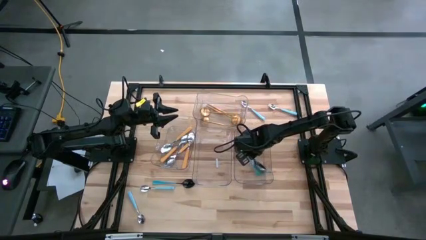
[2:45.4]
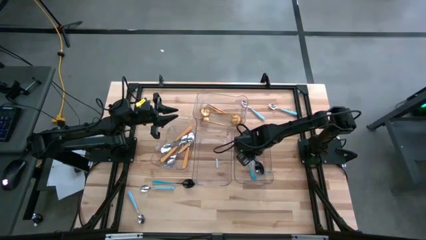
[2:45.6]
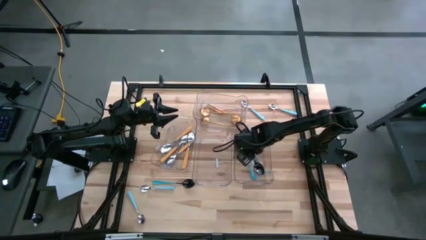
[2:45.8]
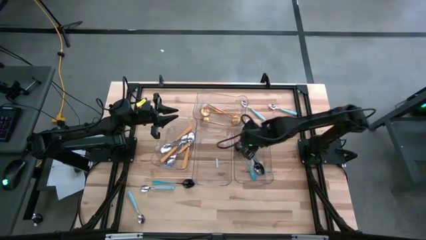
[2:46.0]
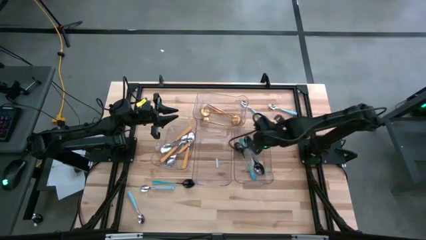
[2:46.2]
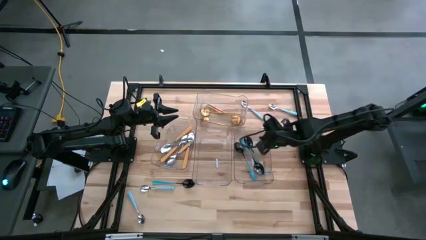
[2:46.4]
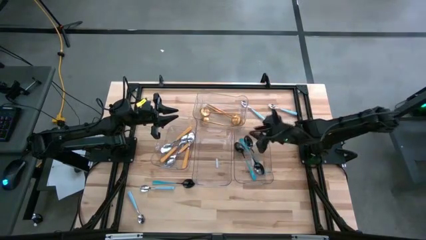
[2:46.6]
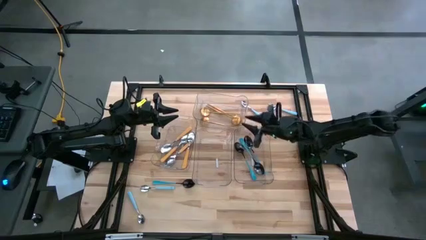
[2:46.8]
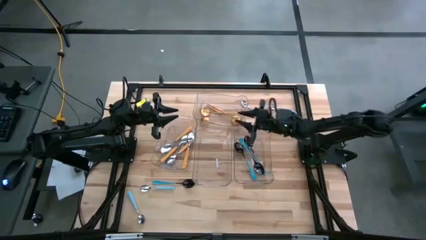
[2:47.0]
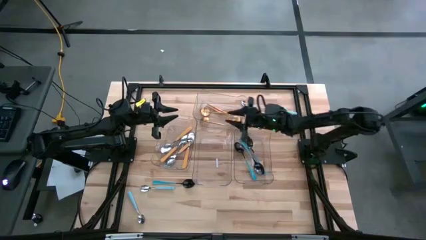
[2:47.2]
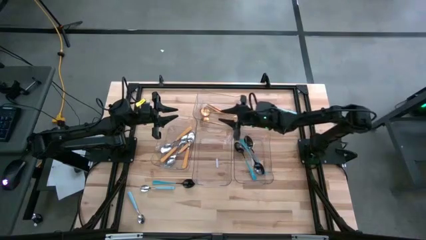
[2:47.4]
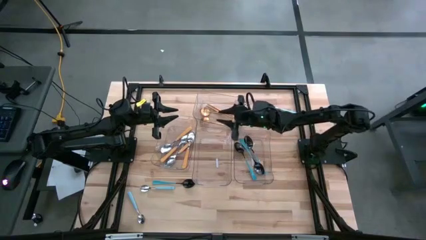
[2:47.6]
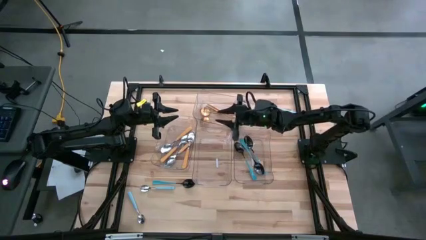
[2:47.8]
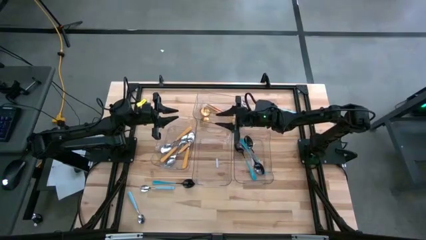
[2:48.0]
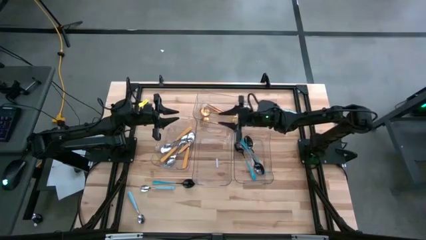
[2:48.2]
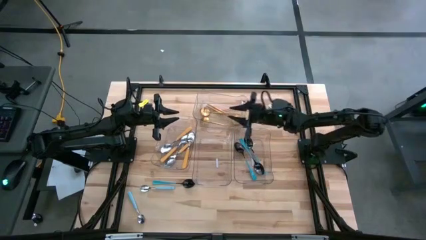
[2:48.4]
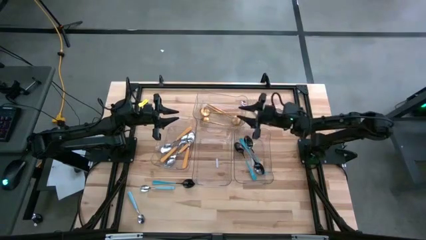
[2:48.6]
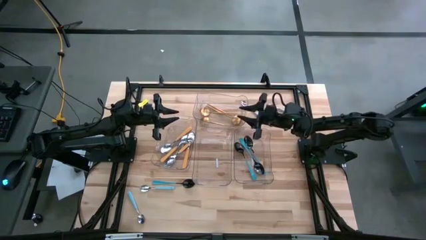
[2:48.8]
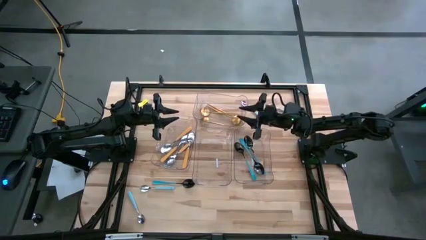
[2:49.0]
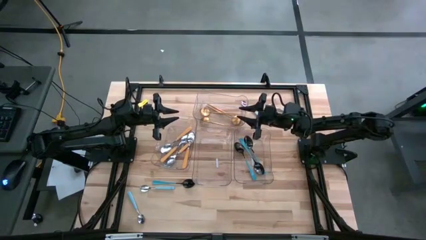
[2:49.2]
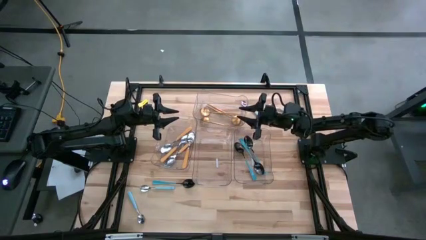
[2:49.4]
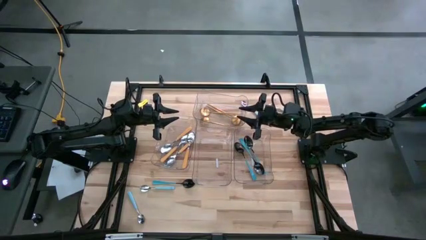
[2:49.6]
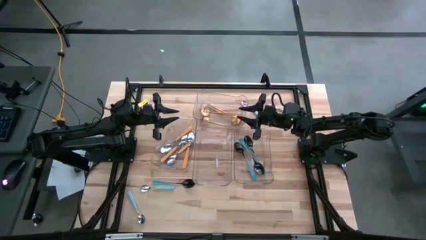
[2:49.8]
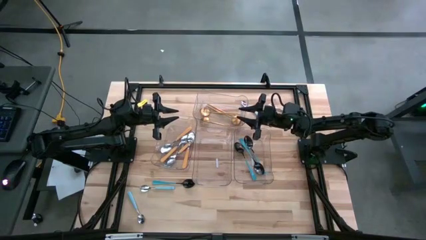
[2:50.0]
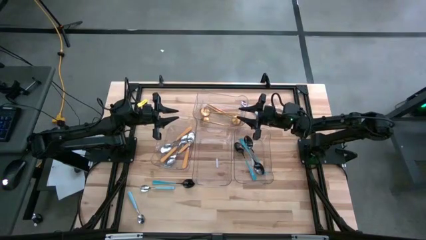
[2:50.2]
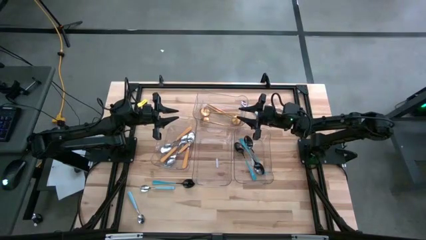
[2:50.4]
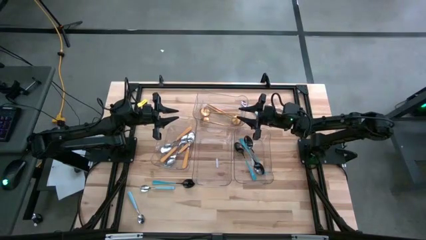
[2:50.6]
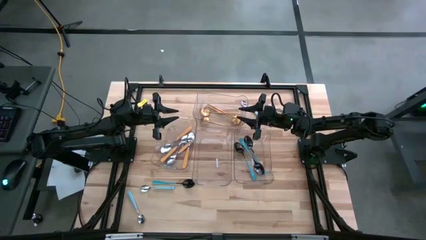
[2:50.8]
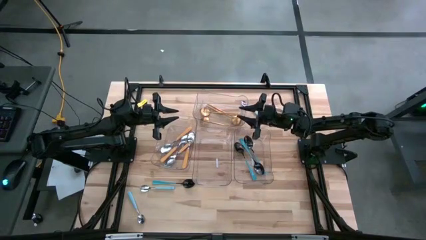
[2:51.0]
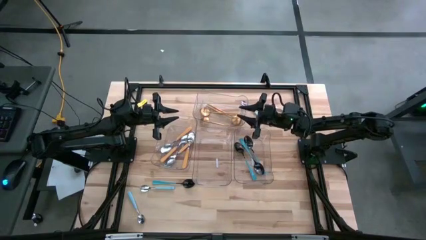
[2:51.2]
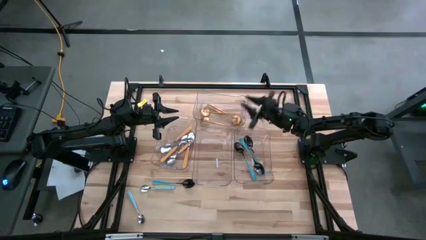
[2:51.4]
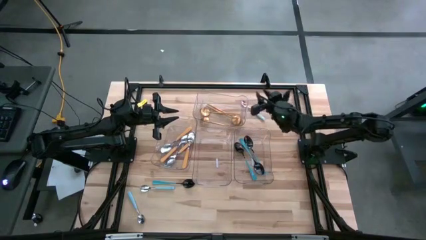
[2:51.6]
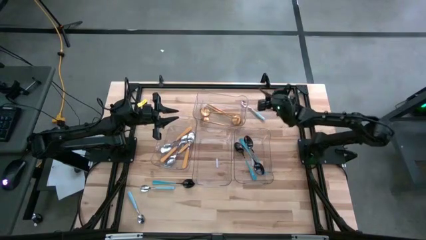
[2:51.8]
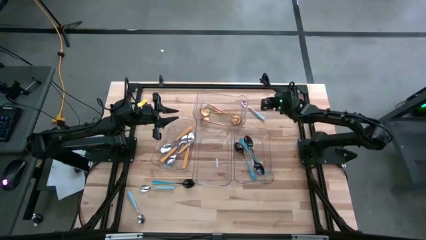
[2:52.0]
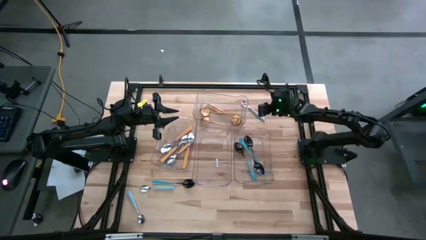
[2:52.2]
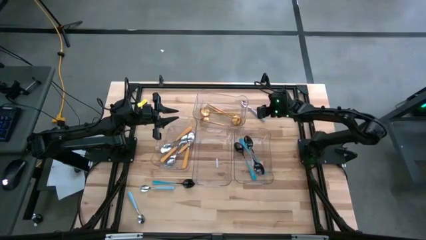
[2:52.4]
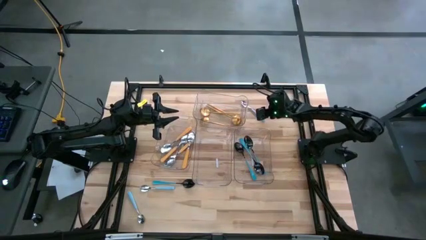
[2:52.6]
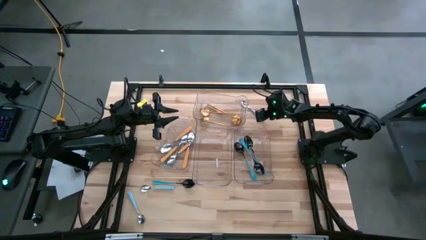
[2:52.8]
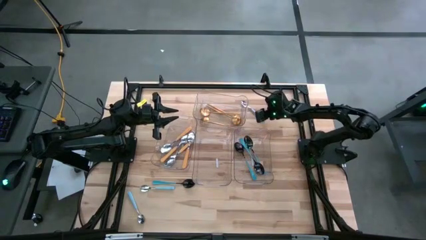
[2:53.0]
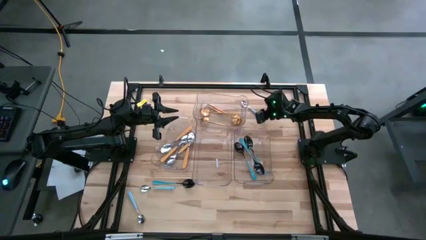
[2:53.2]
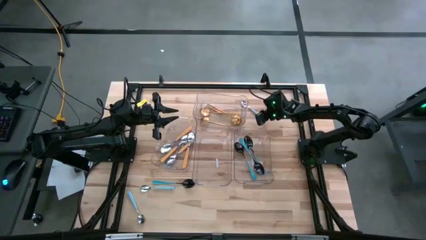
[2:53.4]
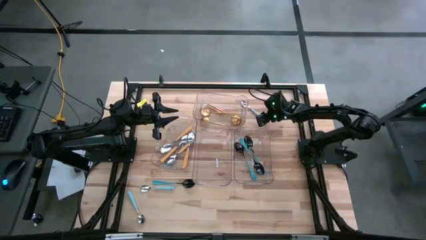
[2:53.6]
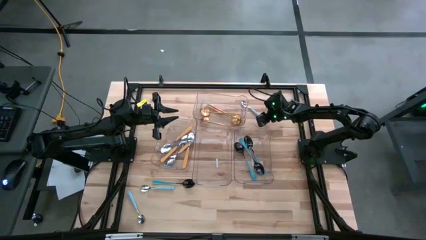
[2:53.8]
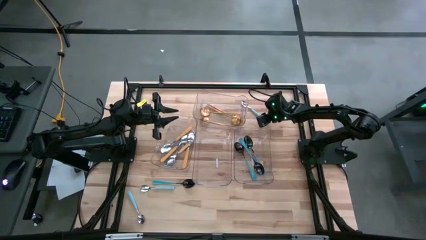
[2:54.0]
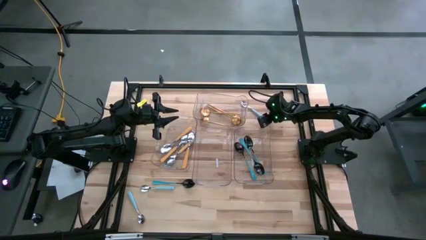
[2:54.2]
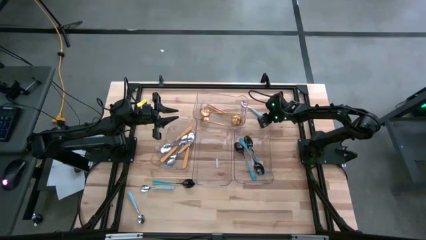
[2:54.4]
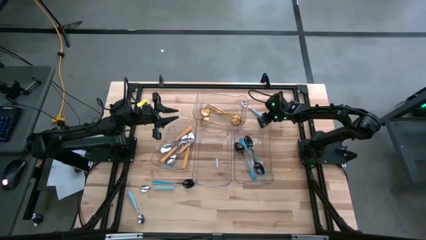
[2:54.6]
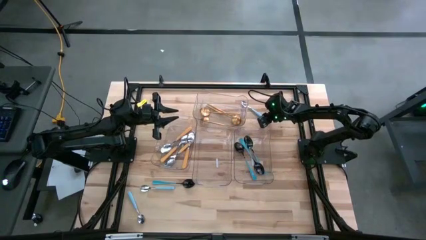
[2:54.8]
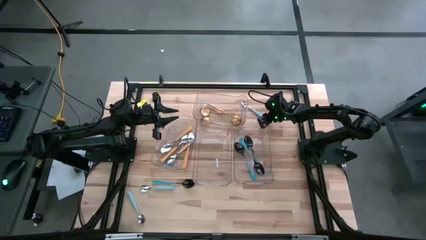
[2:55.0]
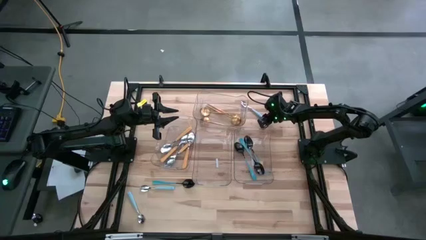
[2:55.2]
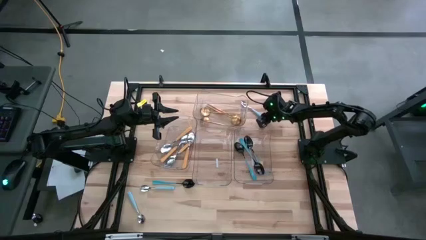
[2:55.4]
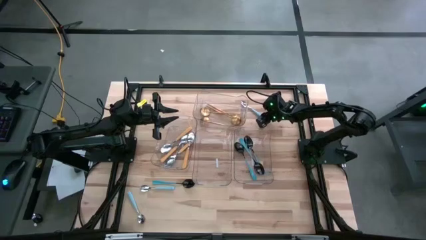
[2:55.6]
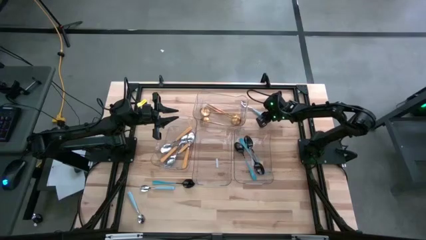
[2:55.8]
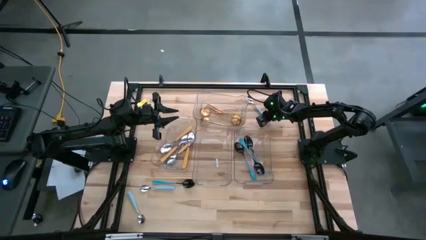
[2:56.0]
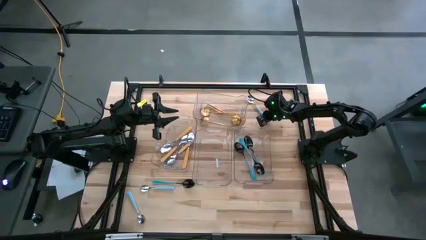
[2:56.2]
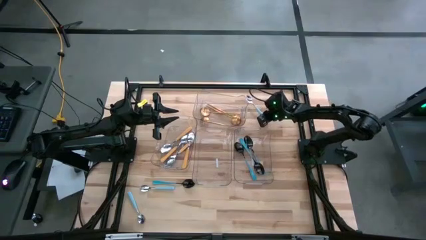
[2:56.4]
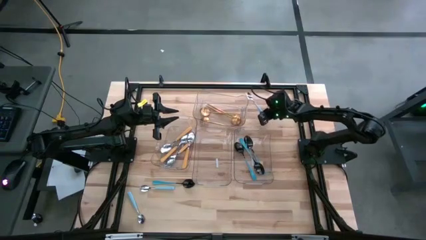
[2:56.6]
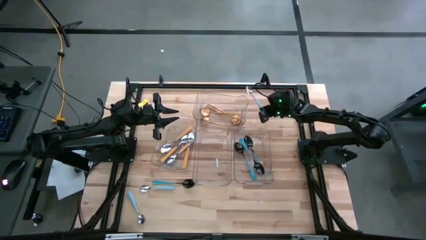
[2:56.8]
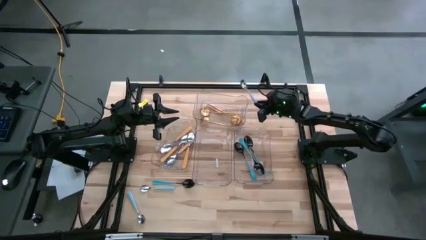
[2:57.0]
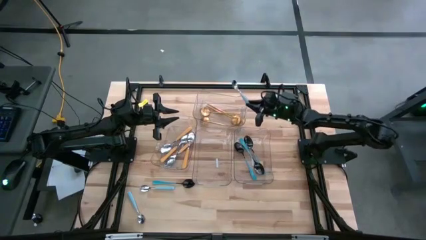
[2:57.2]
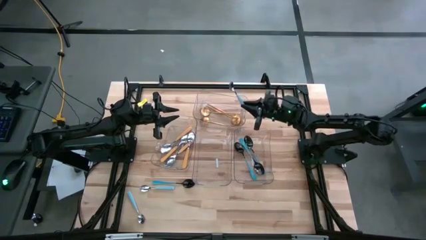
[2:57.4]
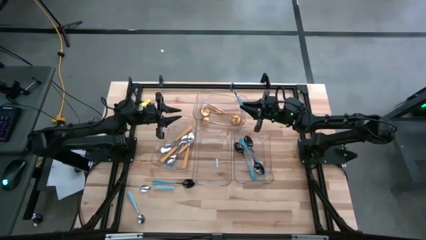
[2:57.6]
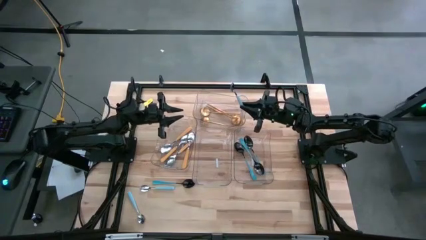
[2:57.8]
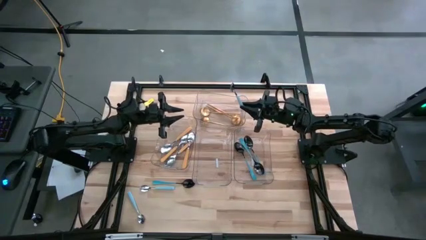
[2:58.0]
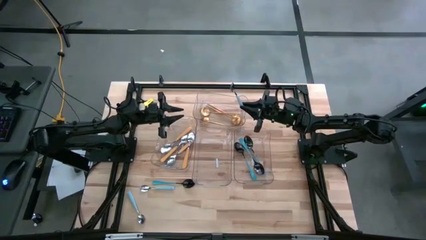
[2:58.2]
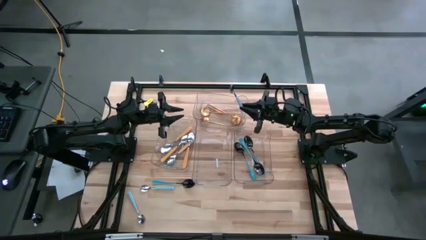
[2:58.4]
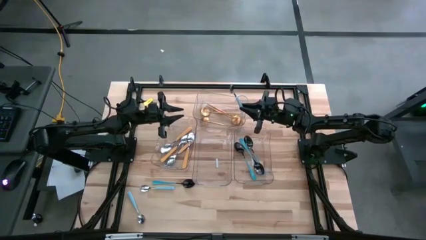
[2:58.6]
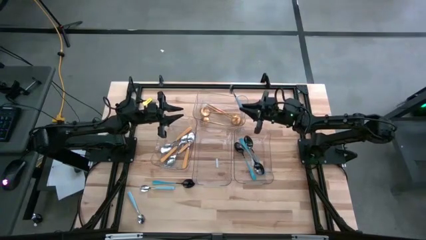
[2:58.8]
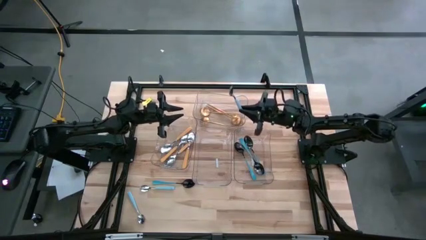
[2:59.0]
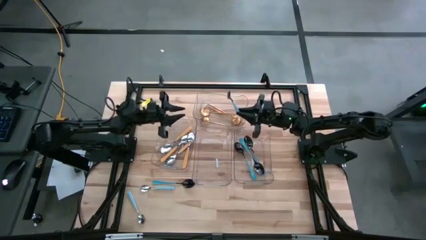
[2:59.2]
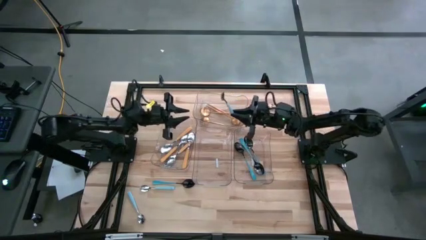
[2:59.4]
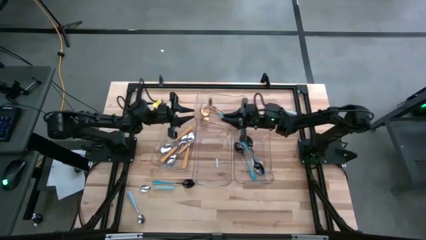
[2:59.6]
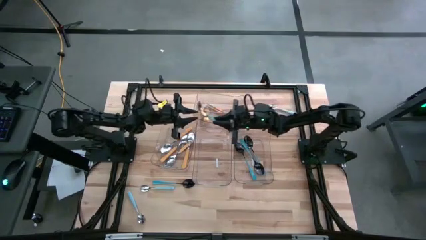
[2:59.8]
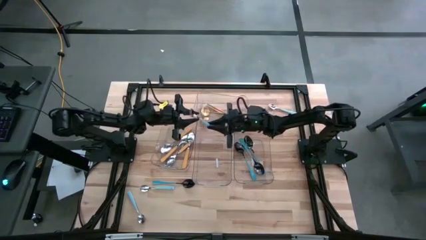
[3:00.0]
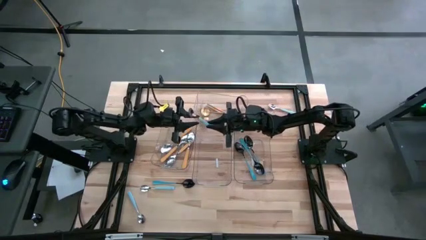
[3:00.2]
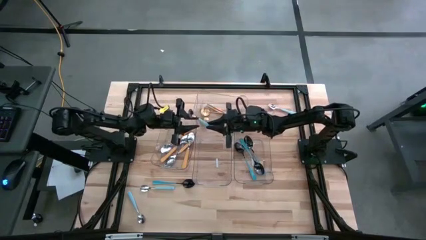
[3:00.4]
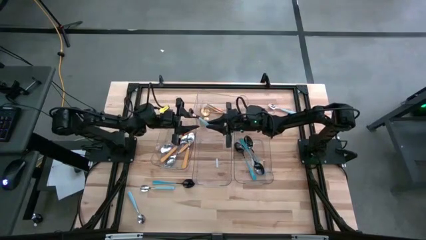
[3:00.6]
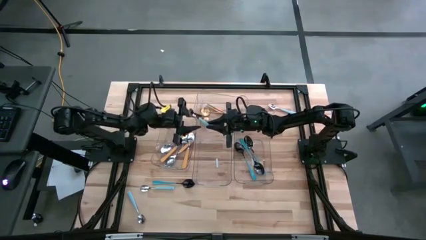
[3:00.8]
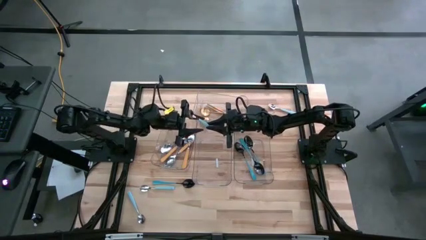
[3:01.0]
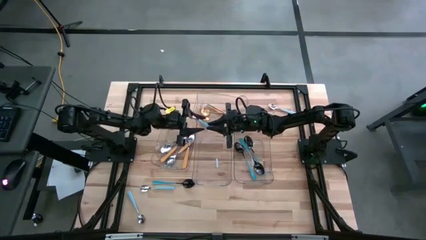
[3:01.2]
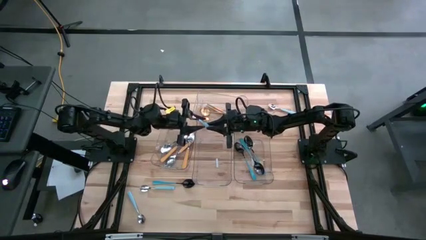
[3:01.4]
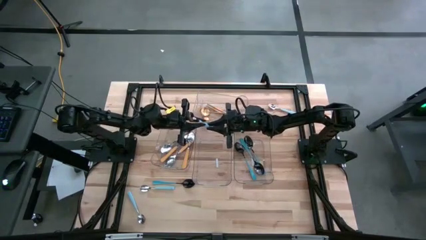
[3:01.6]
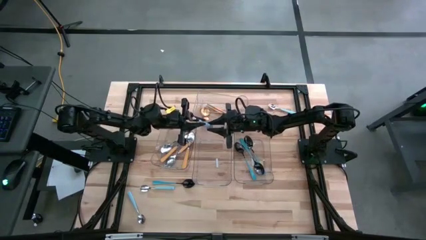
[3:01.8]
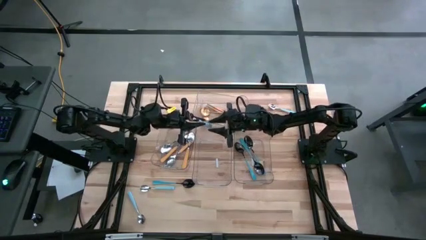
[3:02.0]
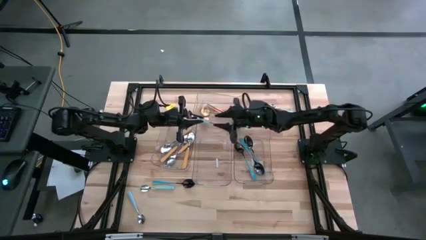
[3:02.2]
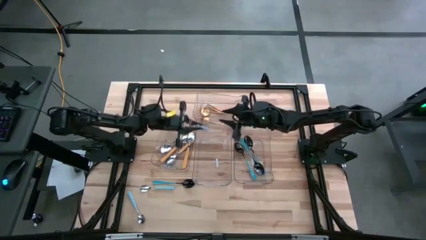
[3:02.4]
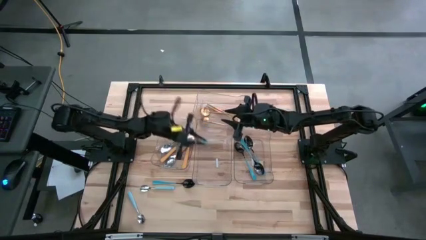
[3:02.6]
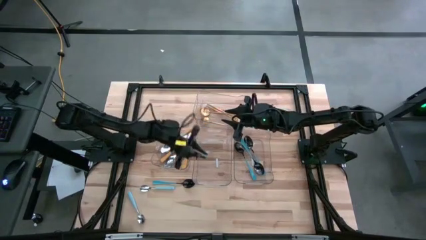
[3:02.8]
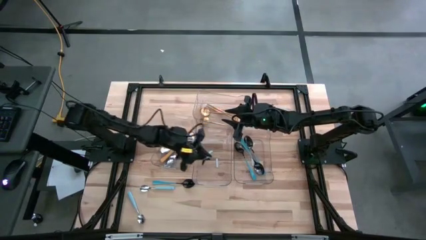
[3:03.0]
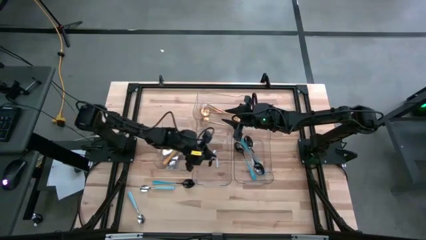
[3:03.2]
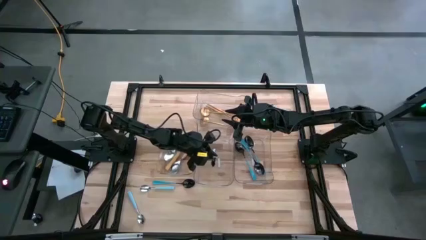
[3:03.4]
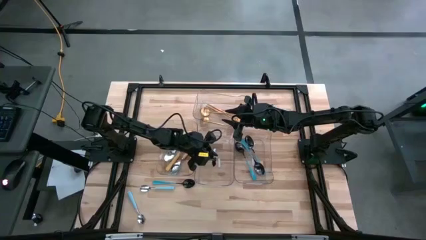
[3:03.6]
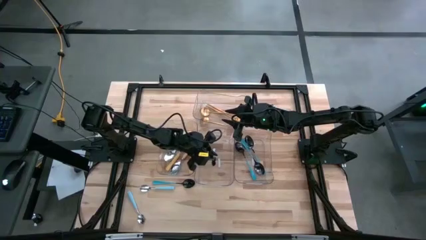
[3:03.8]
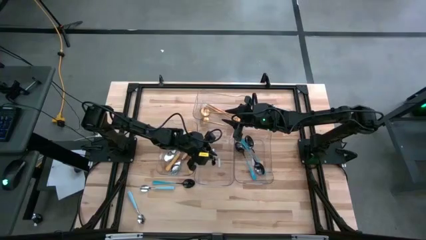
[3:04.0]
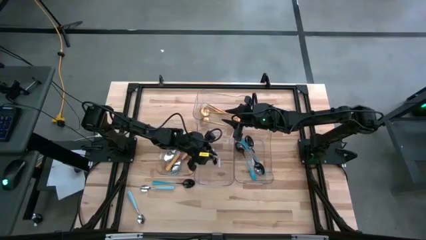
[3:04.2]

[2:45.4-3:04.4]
Task: Sort silverware by color (type)
Put the light blue spoon into the middle transparent bin
